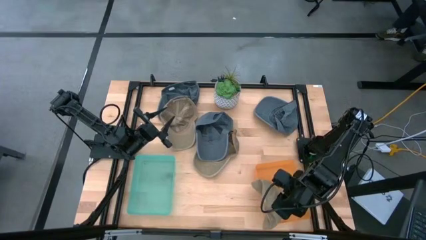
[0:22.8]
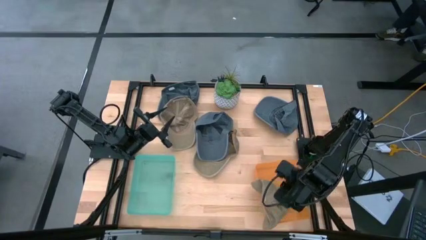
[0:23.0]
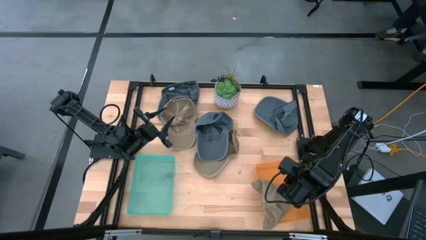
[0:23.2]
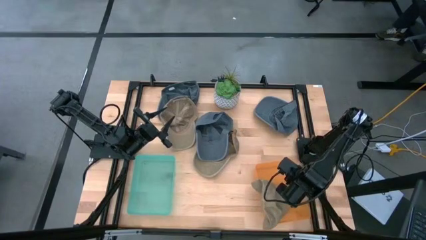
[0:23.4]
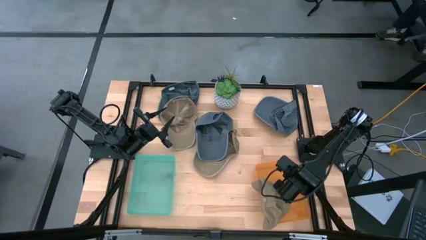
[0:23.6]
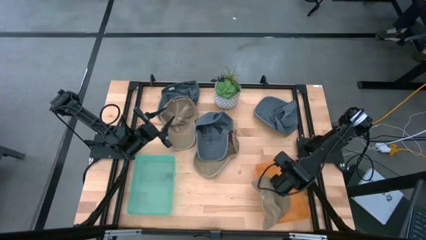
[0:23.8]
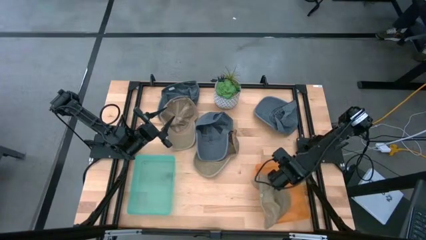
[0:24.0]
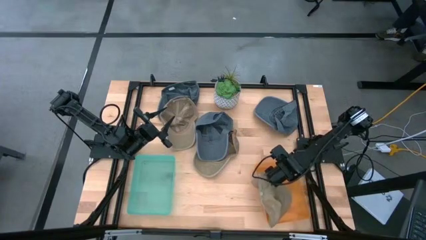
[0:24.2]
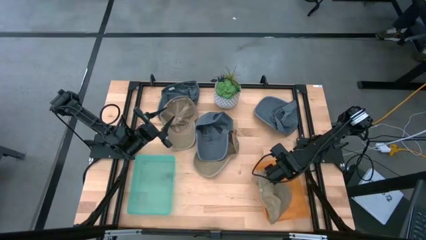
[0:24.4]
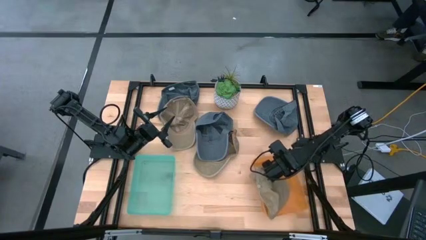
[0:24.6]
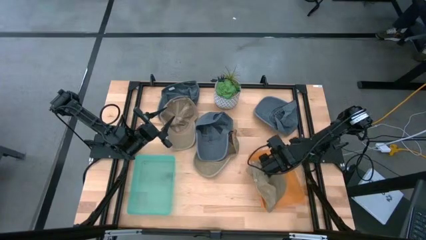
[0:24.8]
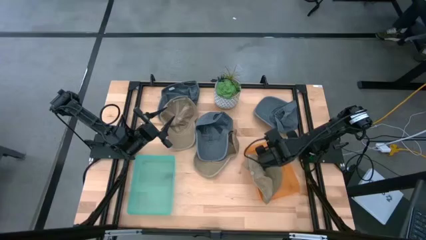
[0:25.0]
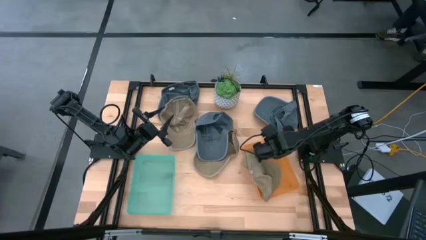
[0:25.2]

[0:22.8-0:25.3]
Task: Pick & Place hat
Adjust the orange bin on the table

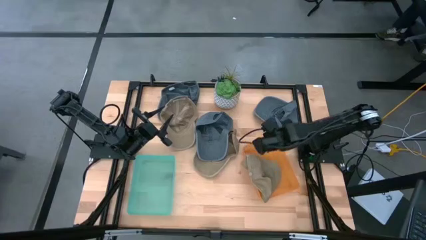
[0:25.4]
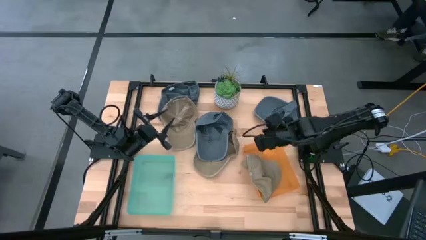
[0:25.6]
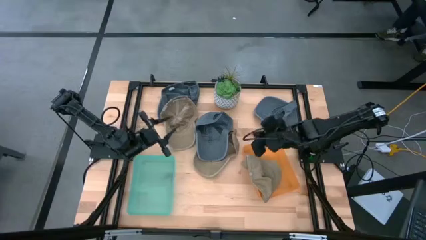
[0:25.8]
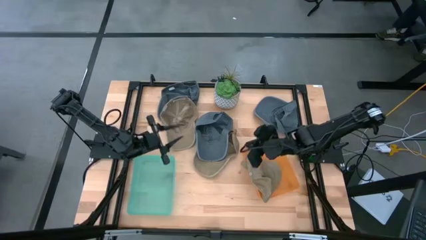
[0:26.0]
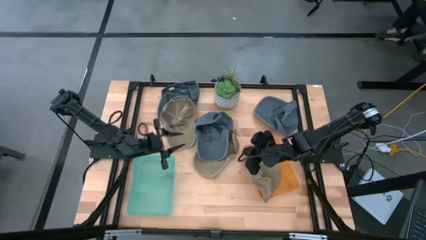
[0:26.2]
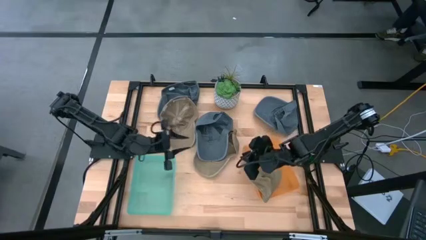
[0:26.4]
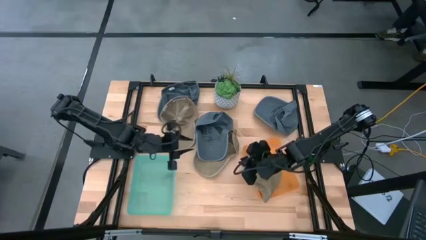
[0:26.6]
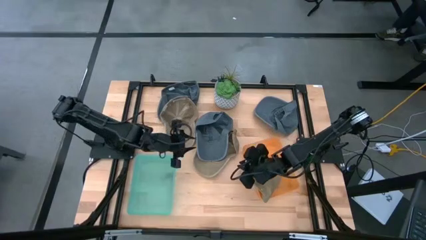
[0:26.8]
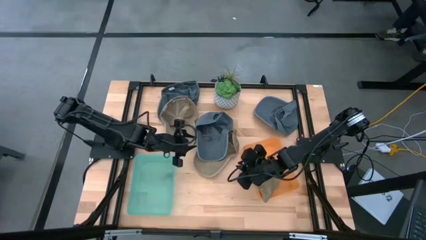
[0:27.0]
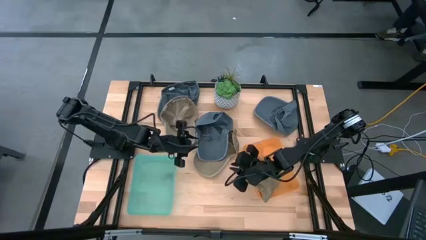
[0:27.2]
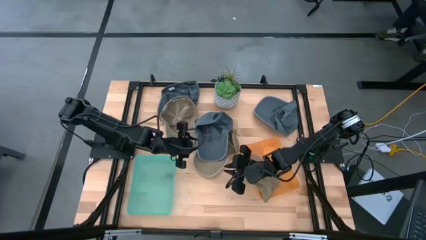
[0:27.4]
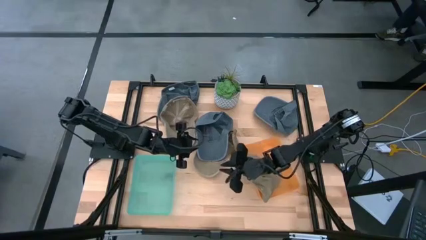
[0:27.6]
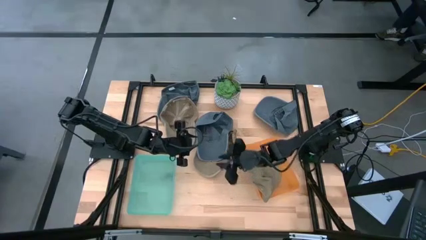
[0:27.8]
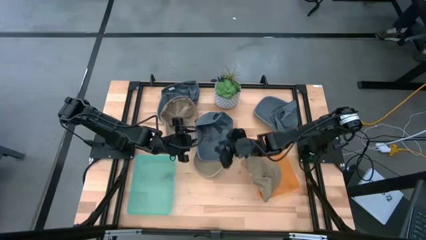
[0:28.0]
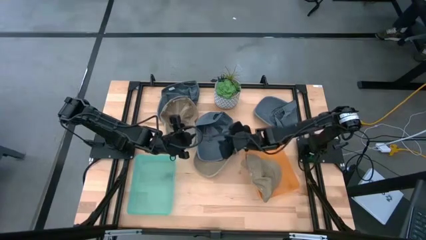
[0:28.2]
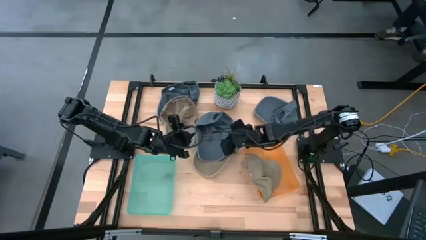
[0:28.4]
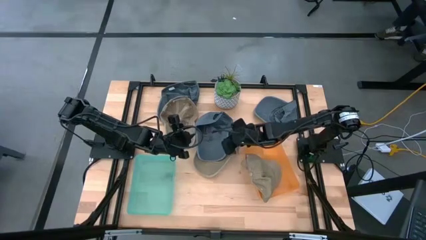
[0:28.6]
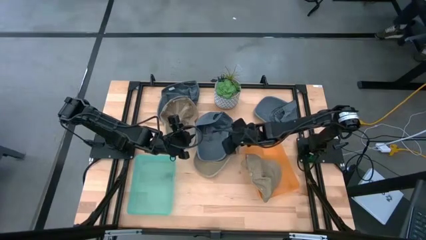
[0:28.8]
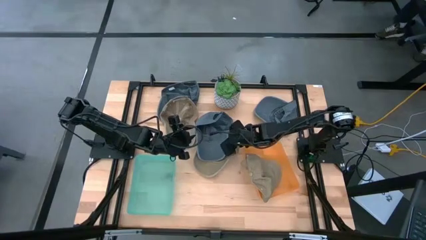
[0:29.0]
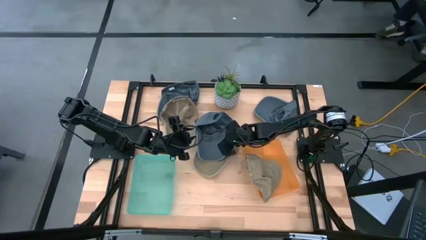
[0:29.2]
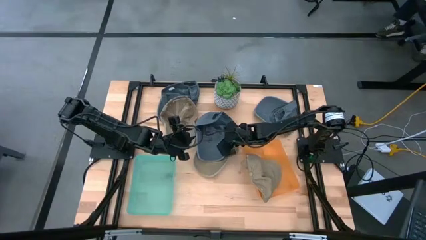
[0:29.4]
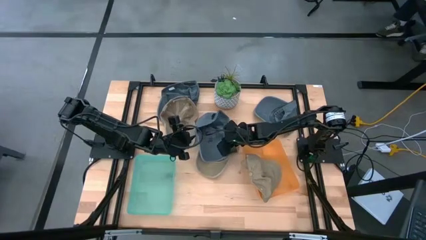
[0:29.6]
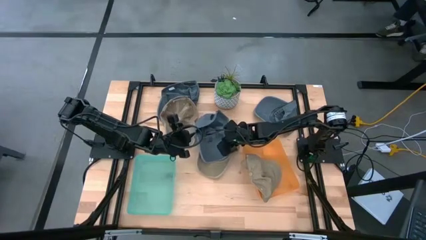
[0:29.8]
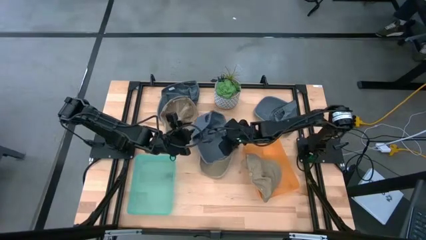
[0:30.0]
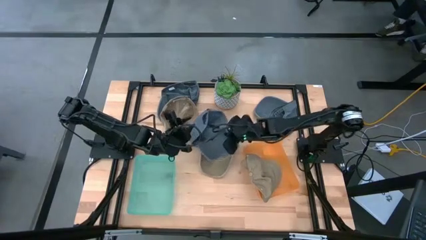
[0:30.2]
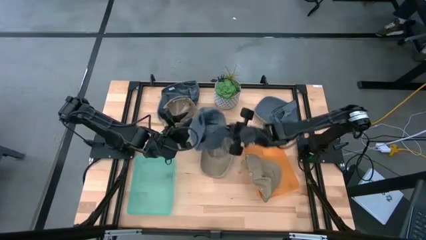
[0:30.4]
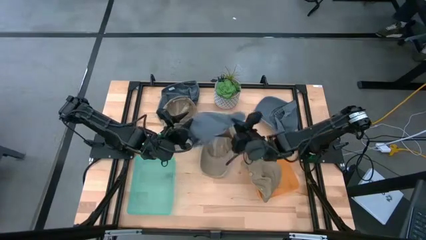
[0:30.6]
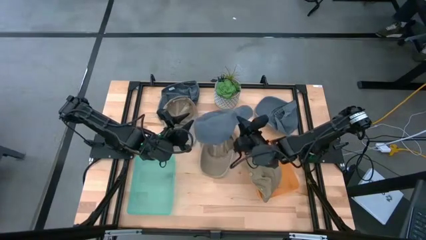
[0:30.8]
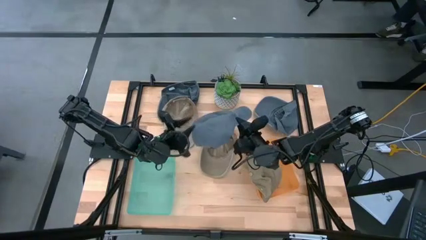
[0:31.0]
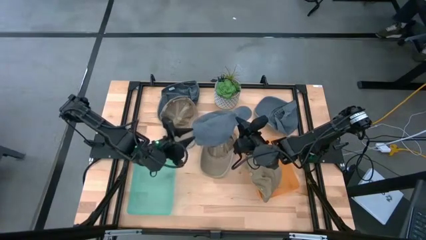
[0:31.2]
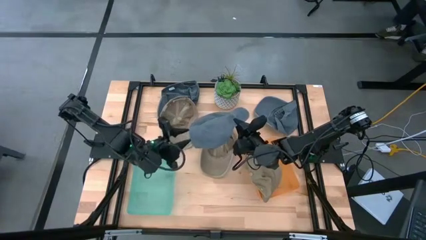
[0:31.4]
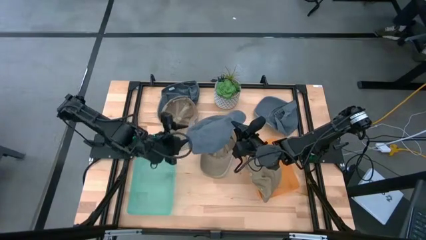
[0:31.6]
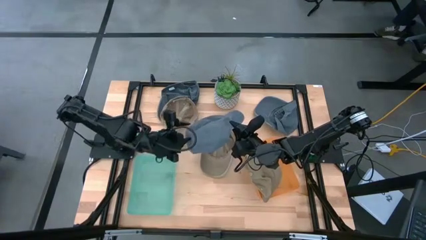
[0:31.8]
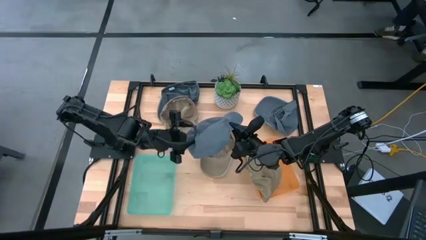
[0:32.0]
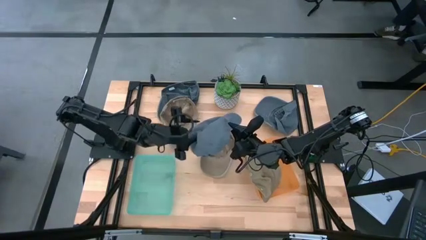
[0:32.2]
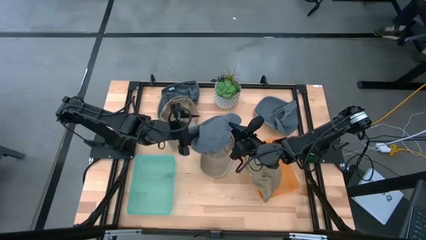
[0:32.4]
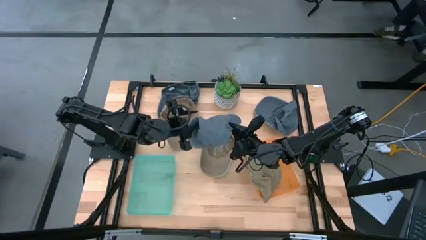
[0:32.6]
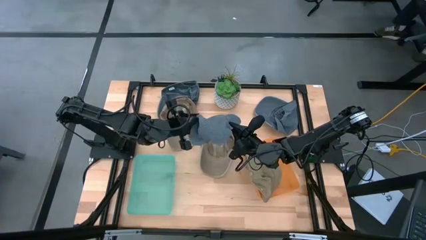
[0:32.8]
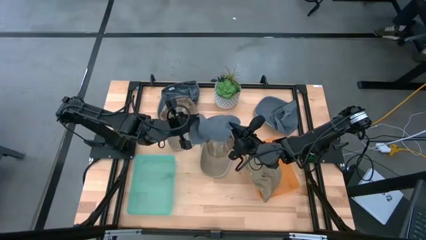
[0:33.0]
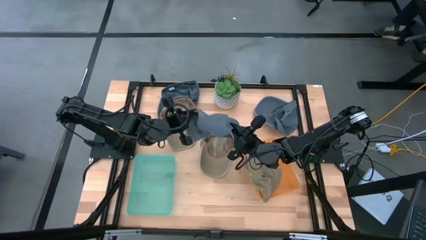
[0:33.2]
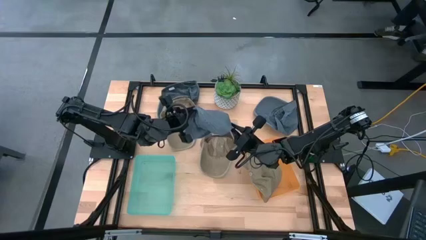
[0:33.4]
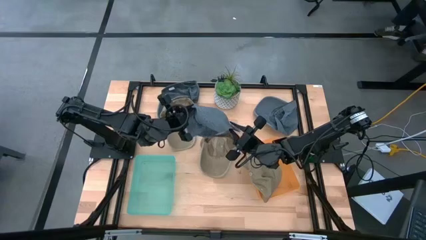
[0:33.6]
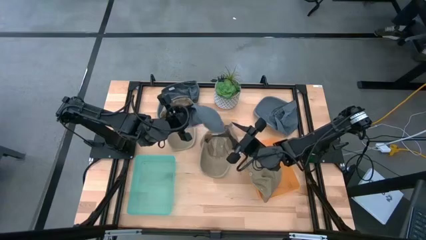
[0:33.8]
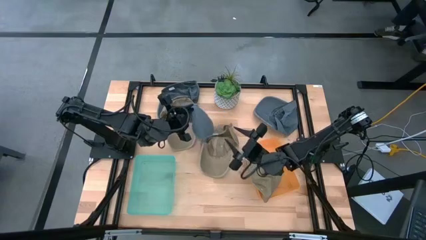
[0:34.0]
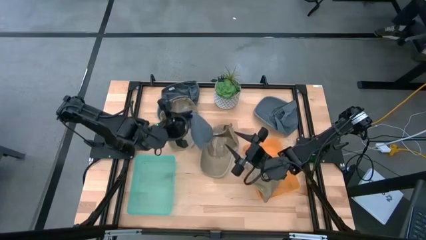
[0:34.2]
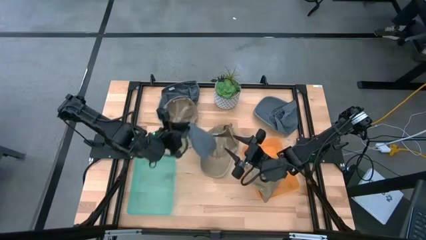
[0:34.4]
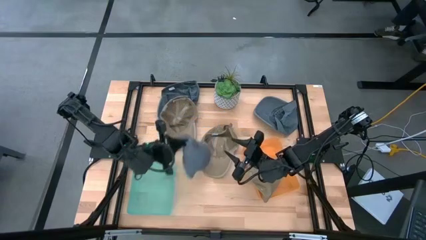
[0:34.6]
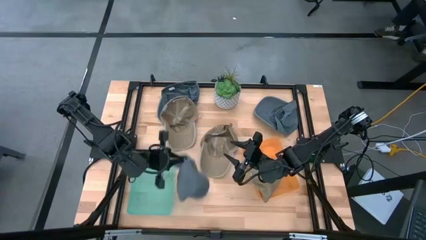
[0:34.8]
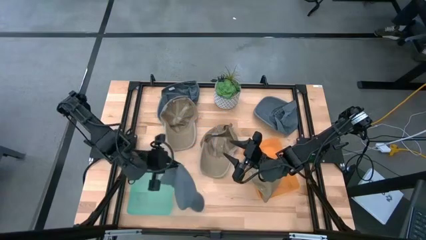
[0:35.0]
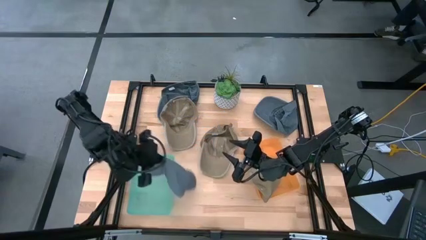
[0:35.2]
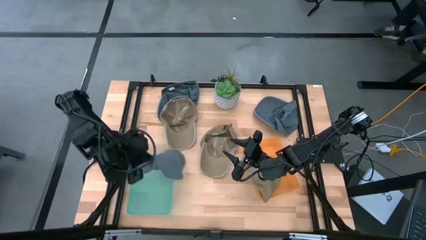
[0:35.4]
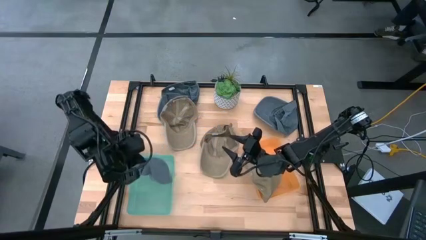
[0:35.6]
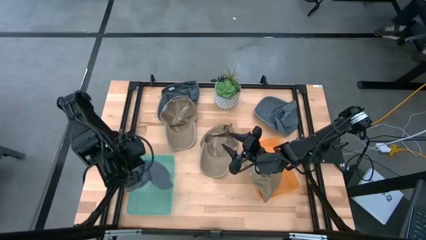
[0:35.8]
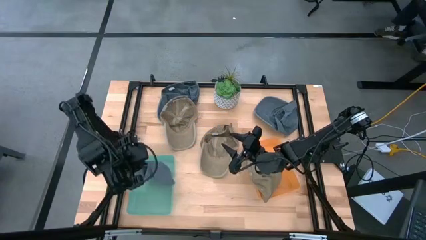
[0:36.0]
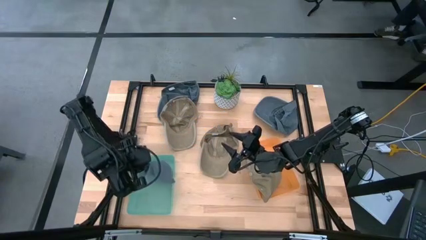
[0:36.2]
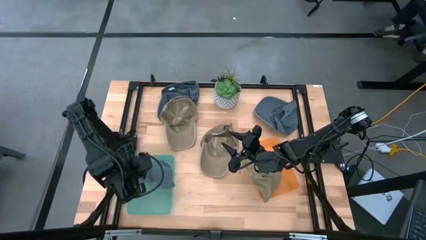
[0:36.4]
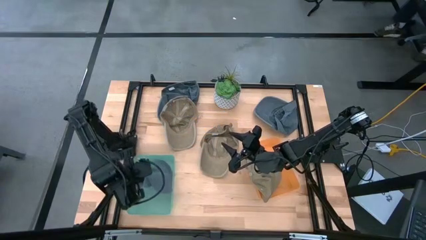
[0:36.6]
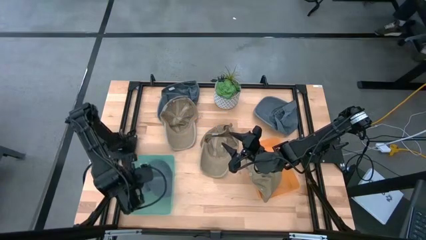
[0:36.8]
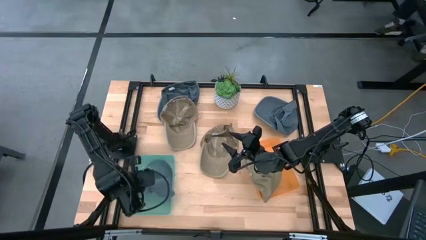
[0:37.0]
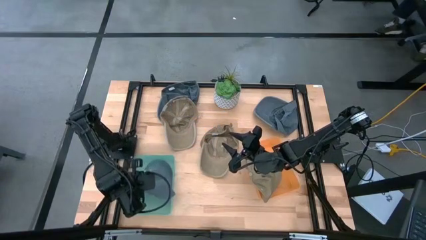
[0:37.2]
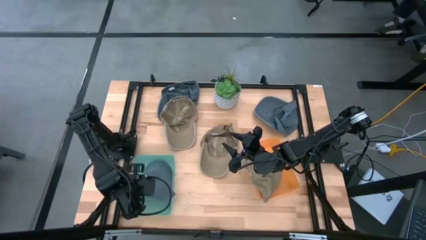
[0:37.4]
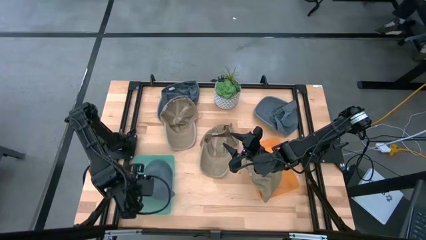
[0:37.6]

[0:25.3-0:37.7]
Put the bottom center blue cap into the green bin

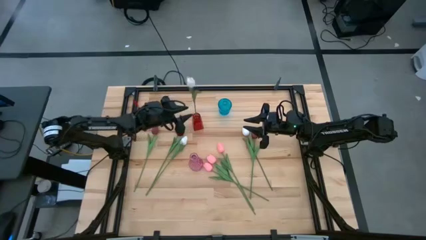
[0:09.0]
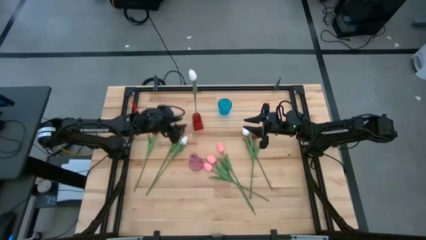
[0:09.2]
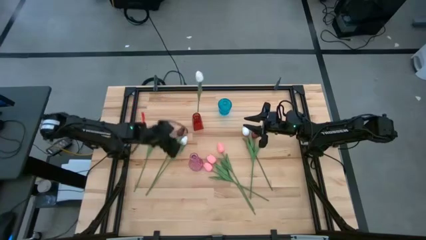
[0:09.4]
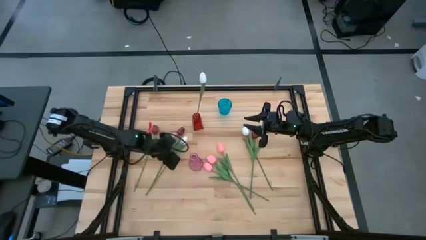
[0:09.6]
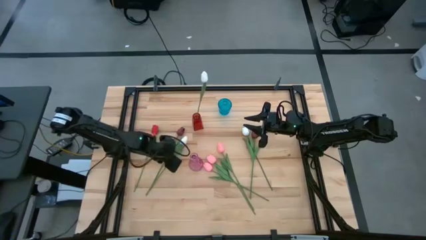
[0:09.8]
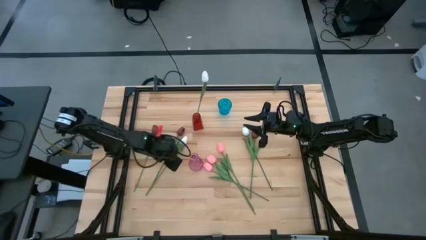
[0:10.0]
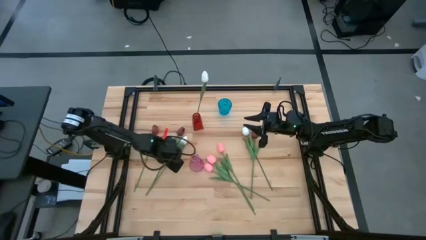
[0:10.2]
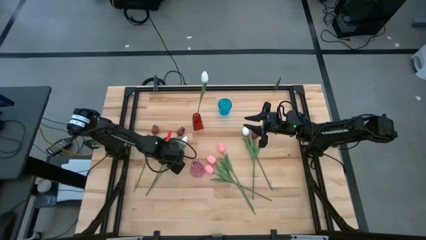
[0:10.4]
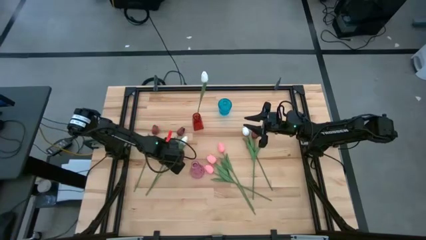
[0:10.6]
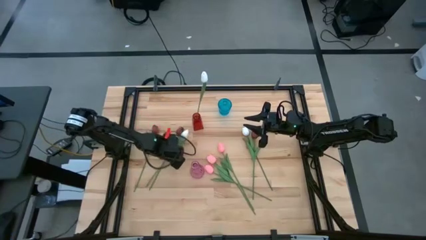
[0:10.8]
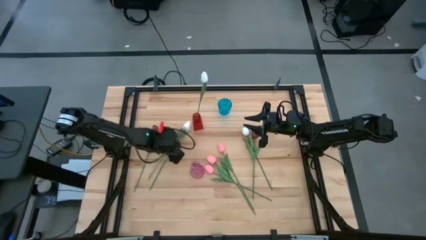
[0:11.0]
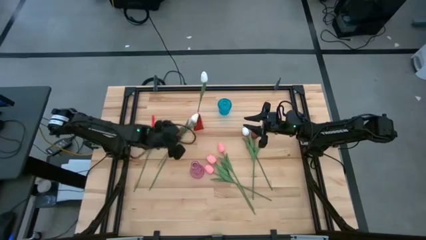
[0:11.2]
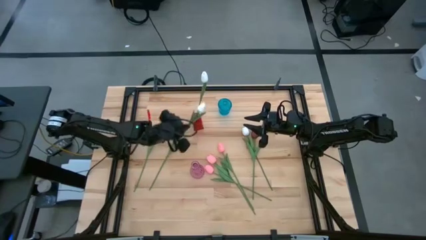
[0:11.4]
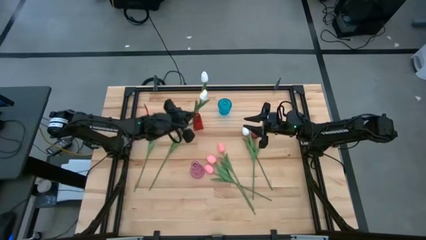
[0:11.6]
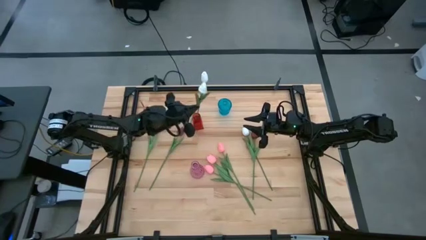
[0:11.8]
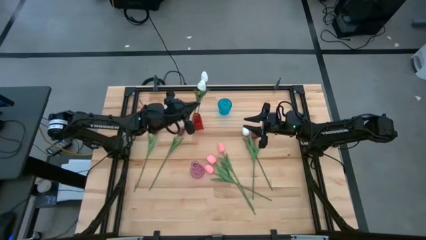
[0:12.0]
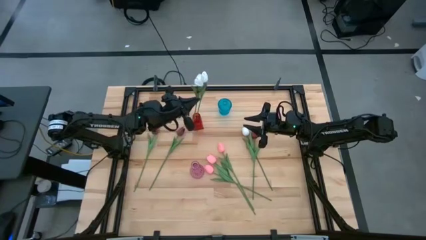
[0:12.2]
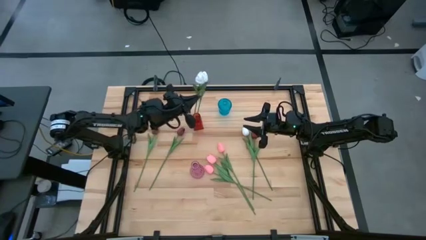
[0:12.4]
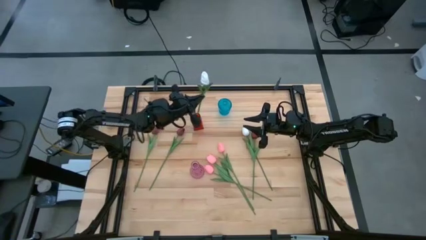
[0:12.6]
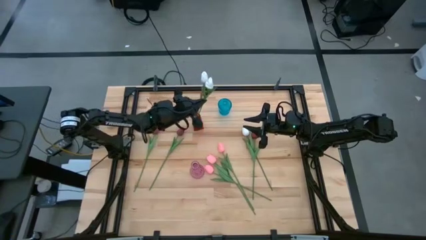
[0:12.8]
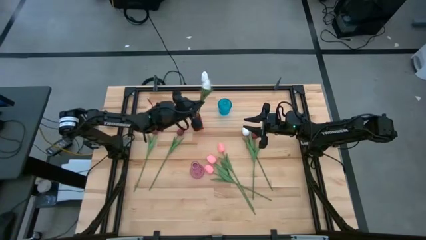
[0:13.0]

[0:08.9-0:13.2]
Task: Sort flowers into vase by color
Put the left white tulip into the red flower vase
